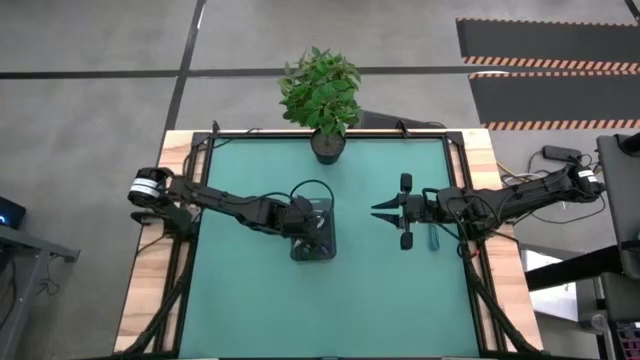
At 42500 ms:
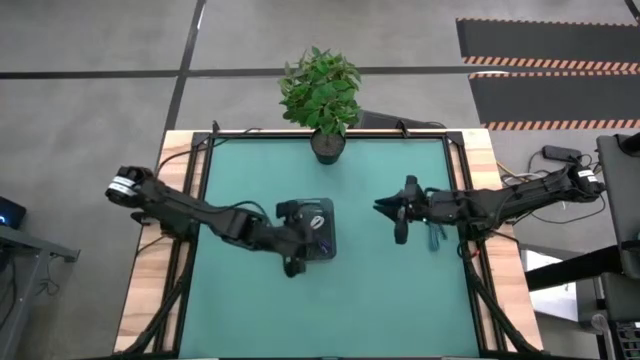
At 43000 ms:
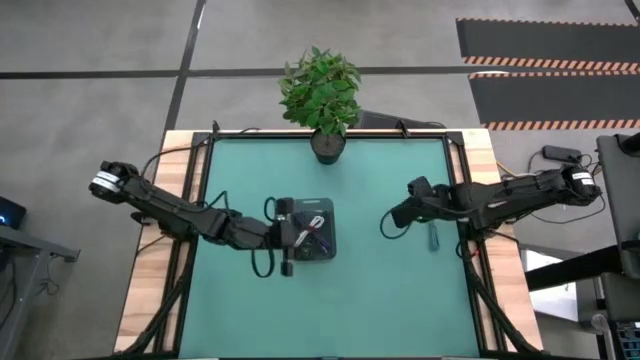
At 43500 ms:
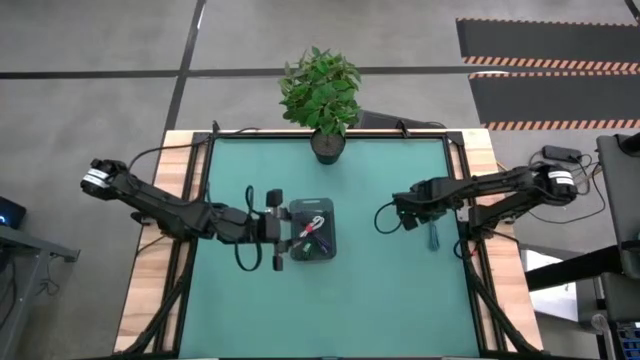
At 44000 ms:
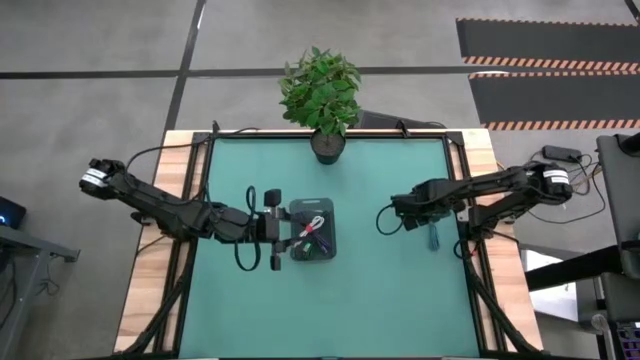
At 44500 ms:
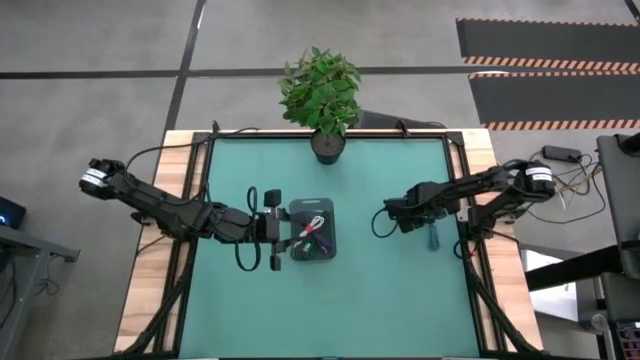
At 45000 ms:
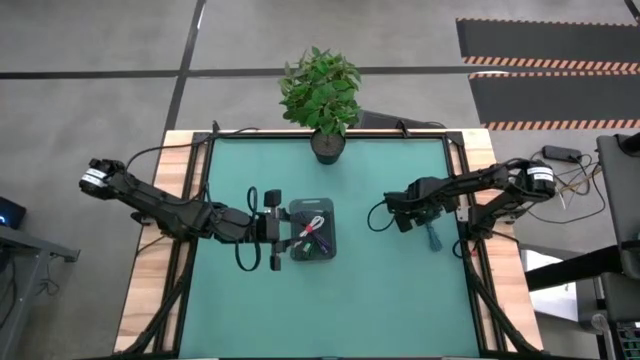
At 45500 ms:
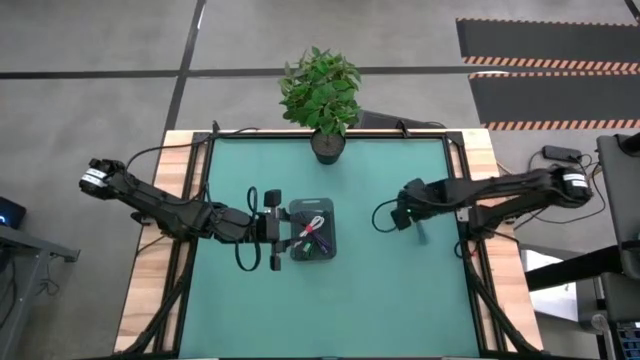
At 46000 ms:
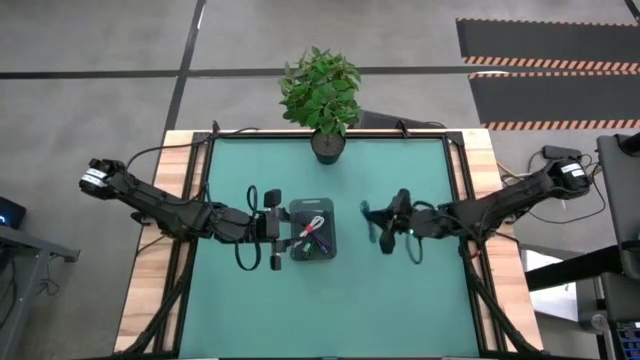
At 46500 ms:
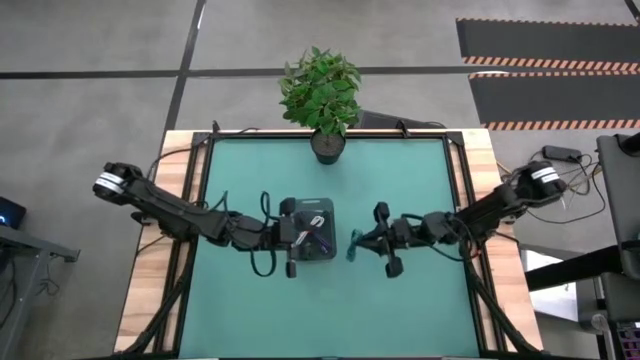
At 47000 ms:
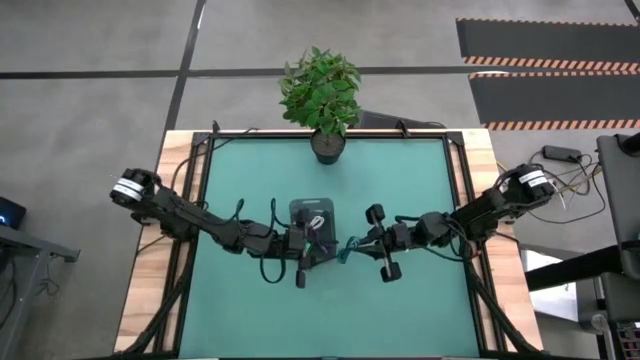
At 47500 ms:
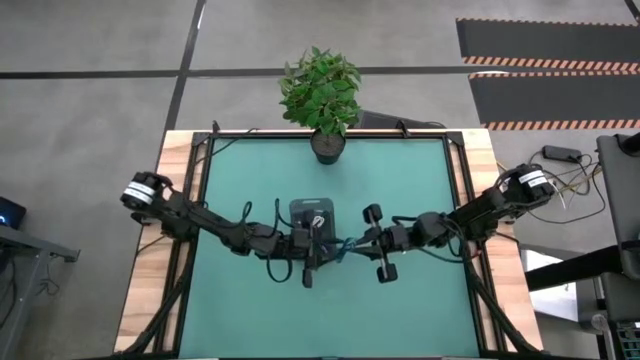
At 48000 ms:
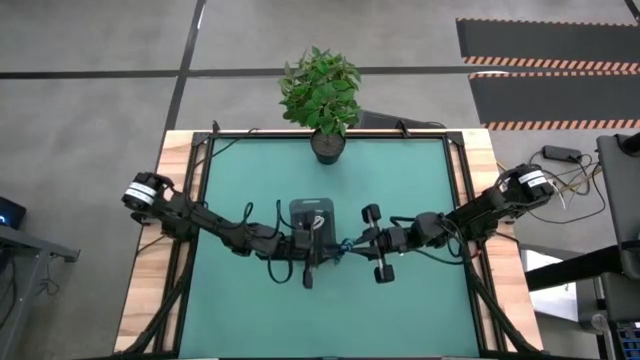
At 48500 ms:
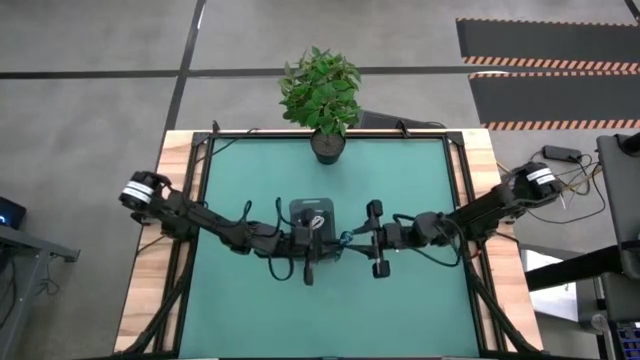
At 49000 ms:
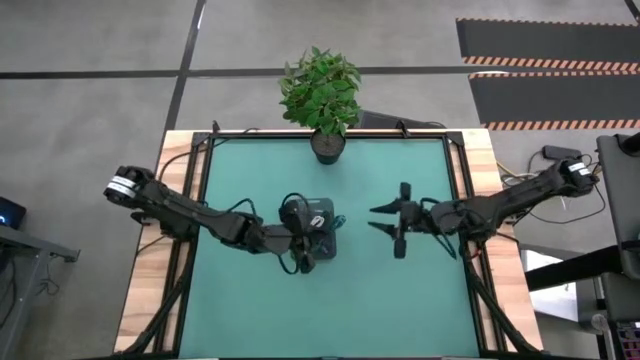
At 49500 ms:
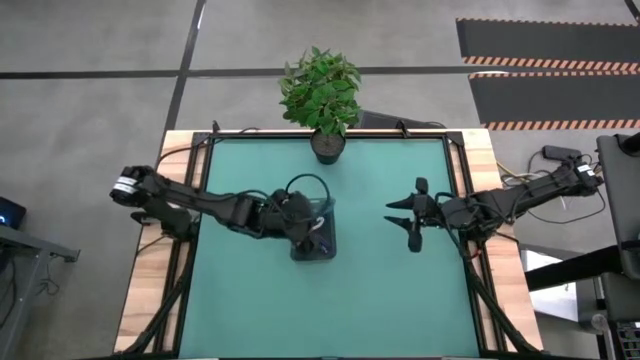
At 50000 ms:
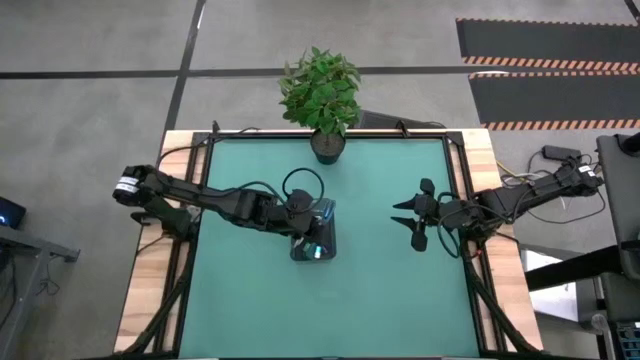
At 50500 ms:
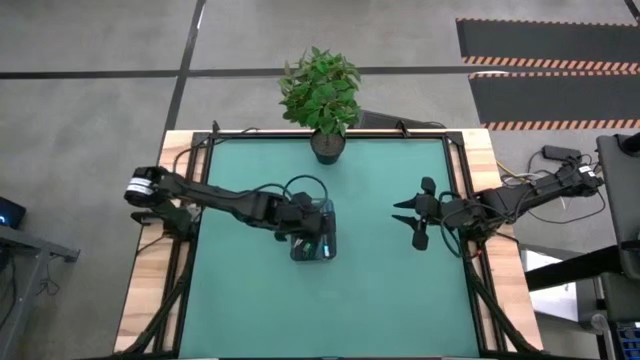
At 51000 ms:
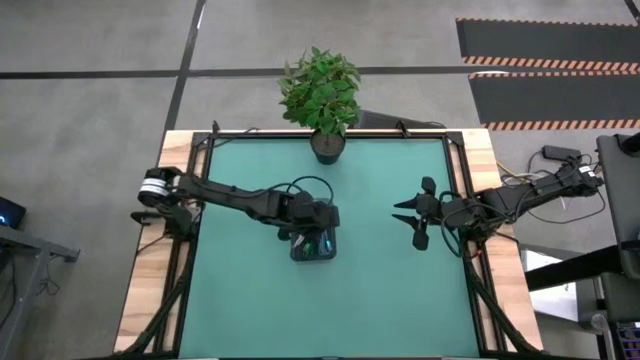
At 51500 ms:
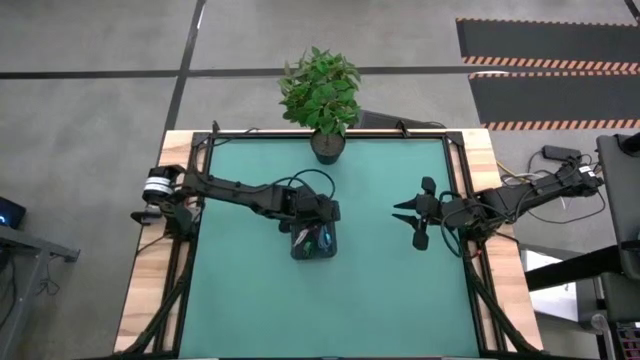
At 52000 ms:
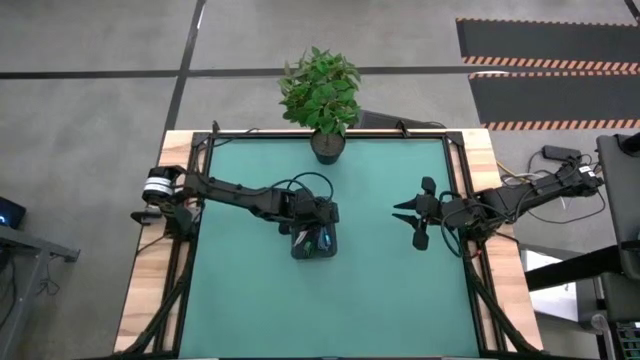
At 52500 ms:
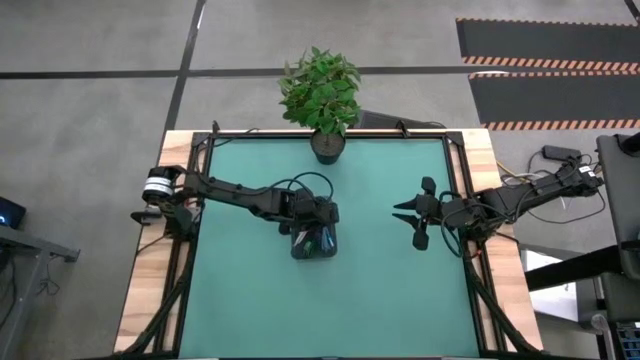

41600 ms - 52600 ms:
Task: Pick and place USB-C Cables
Put the blue charger cable into the black bin

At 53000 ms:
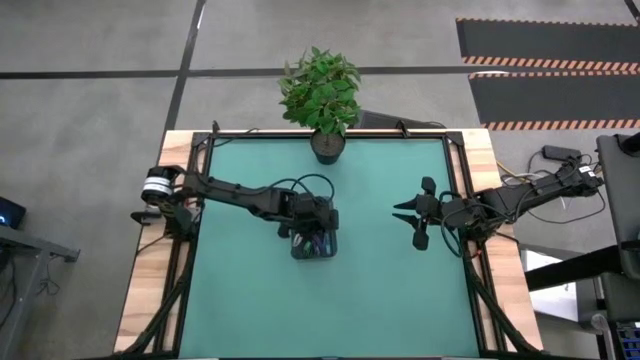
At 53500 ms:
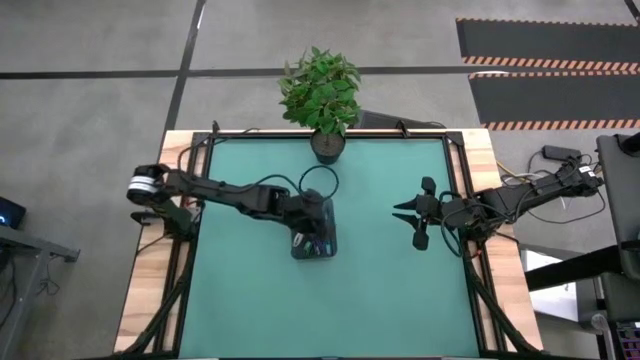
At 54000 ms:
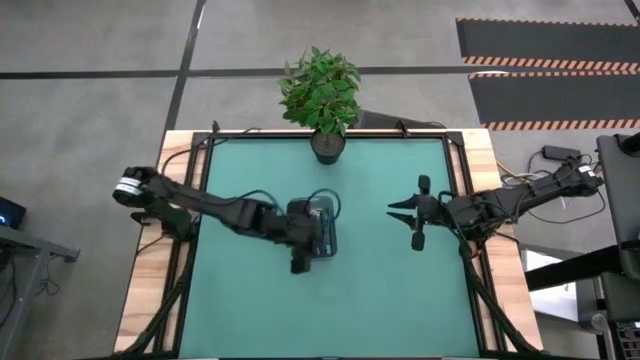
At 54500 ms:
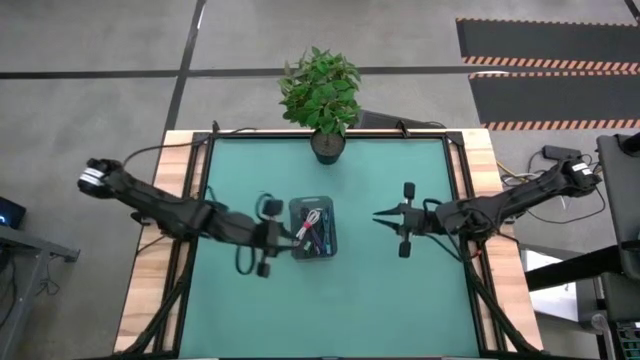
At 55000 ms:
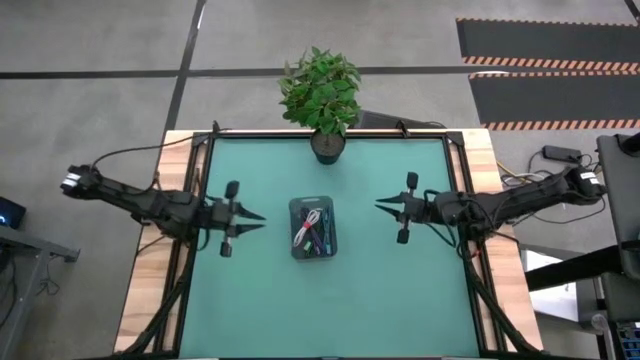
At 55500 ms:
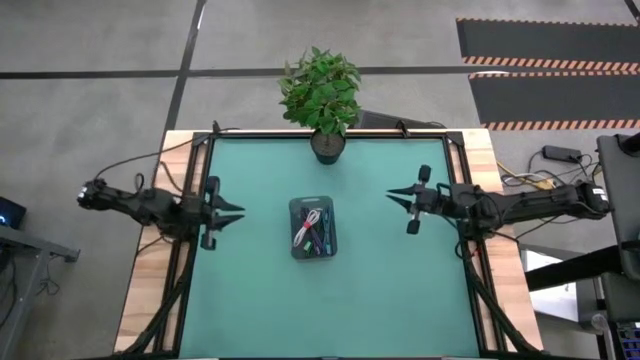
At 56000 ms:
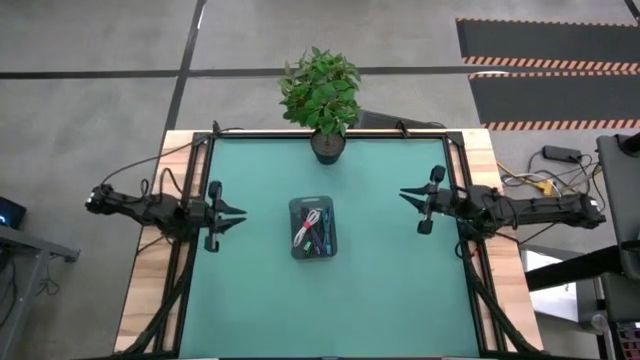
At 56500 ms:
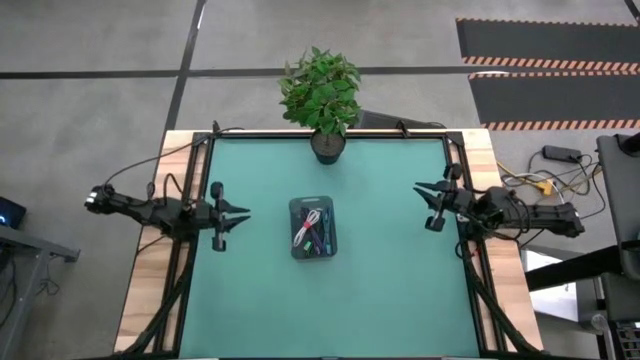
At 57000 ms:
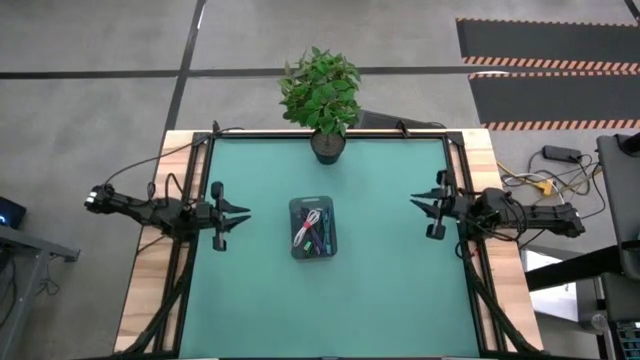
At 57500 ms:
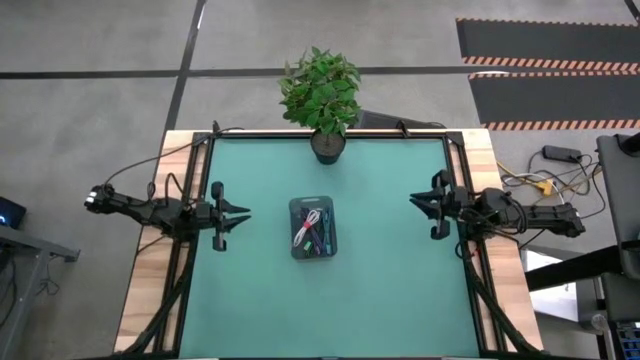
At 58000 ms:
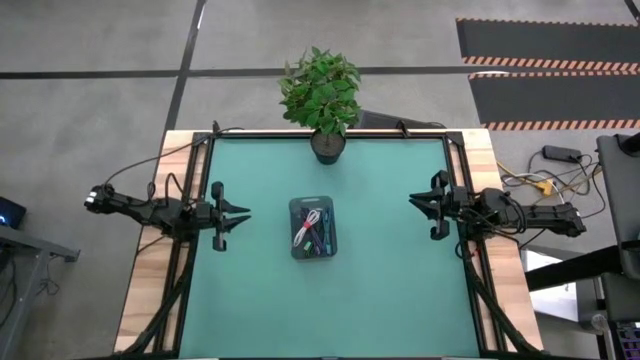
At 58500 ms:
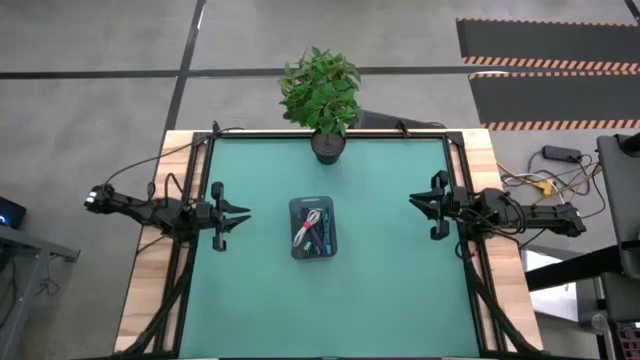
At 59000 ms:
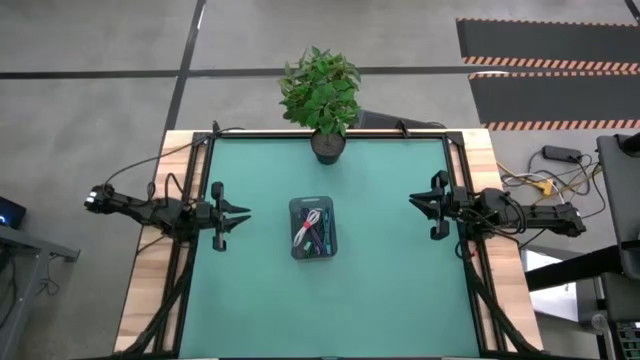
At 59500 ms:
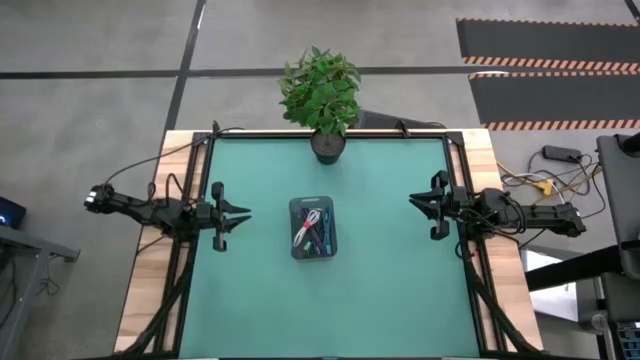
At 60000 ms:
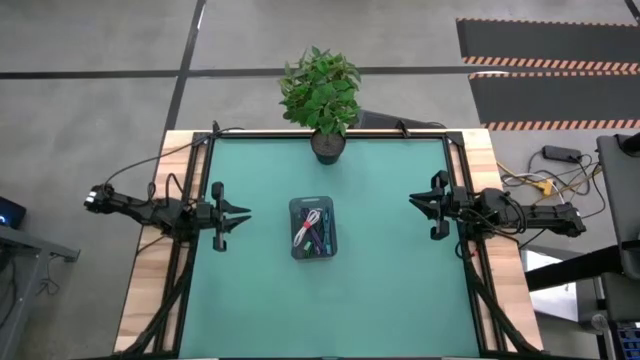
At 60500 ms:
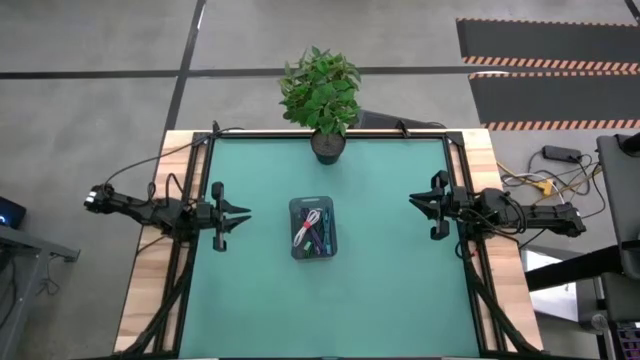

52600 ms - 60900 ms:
Return to Home Position

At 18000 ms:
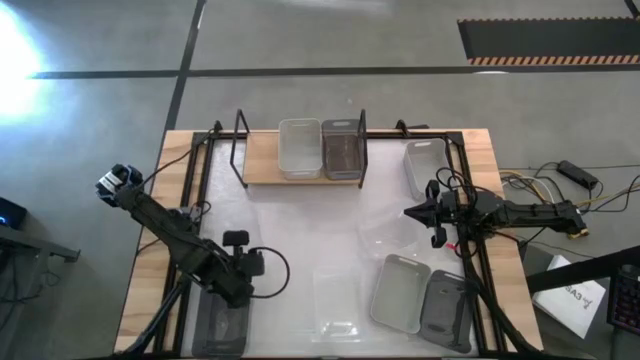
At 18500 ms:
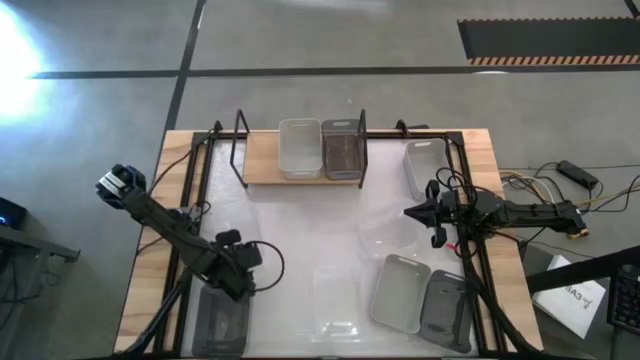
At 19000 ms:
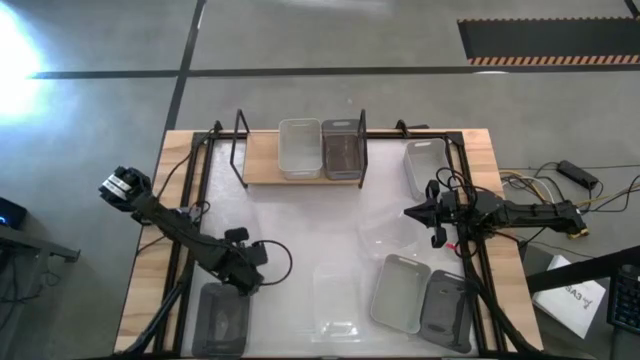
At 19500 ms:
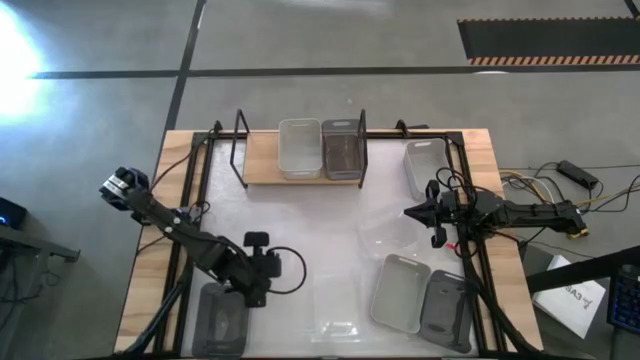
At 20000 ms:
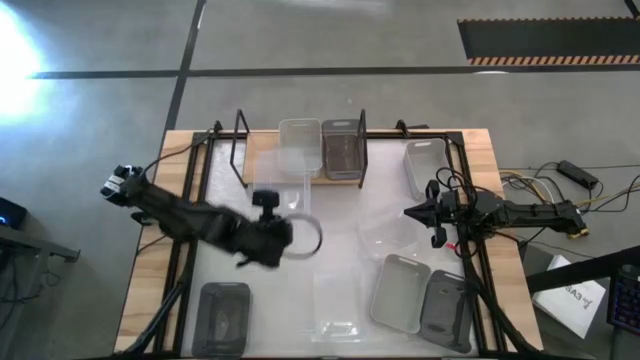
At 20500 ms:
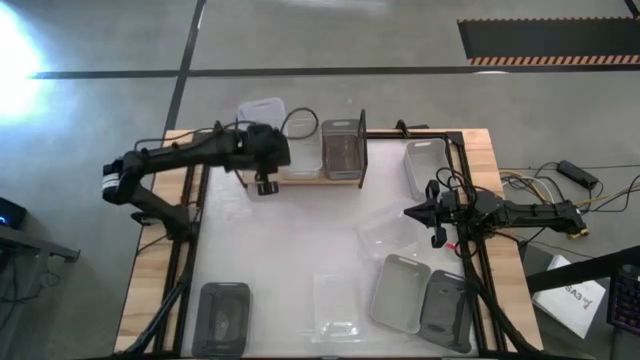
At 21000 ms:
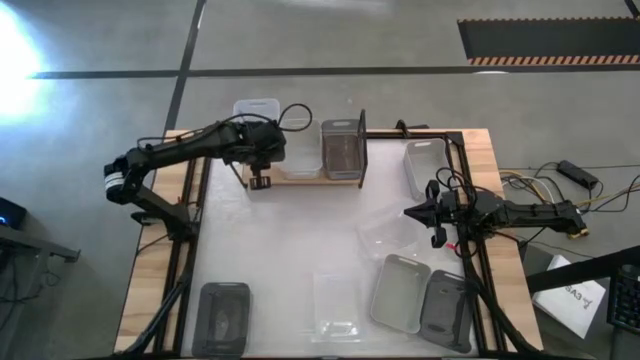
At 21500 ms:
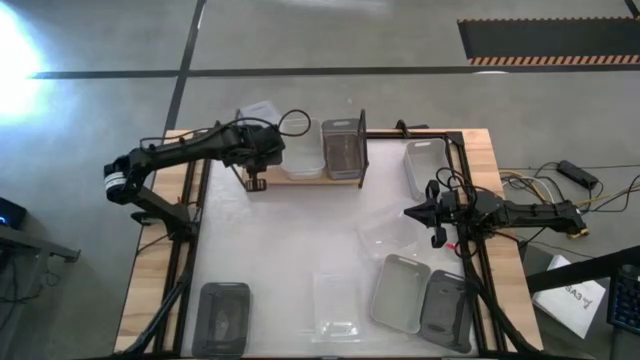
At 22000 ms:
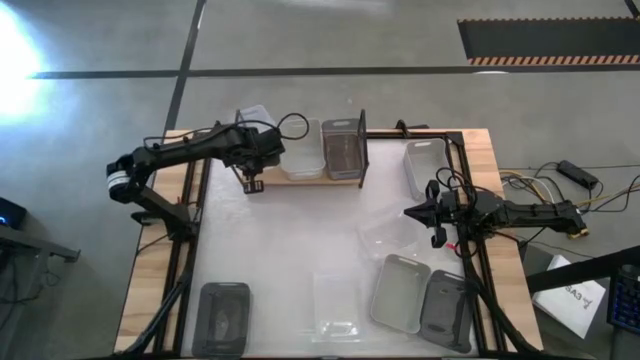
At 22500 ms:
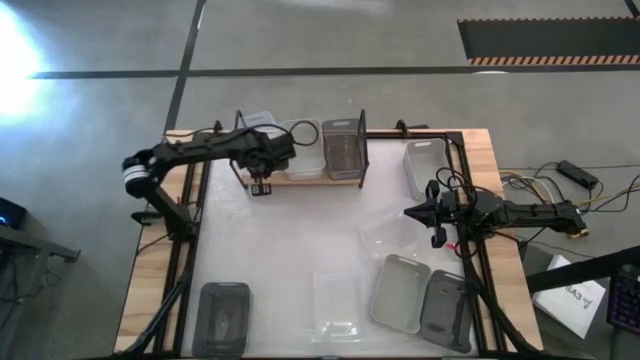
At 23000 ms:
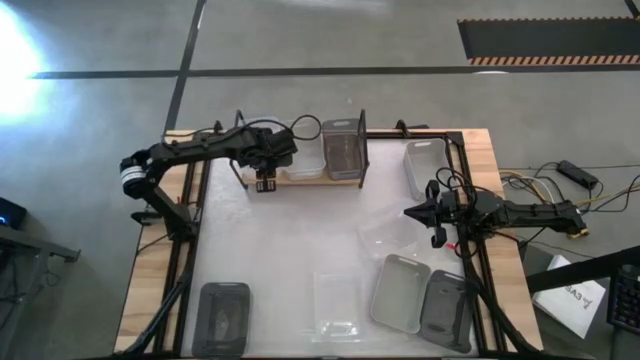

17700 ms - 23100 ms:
Task: Stack baskets on shelf by color
Put the top left transparent bin on the shelf
